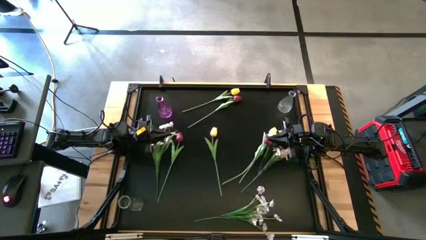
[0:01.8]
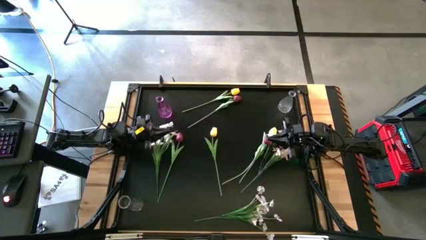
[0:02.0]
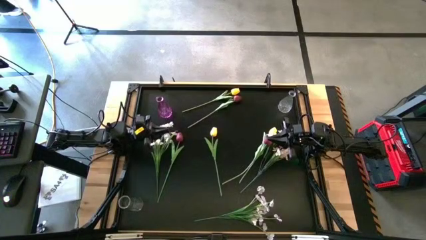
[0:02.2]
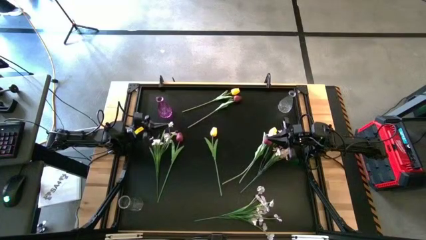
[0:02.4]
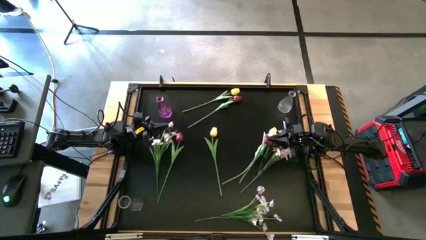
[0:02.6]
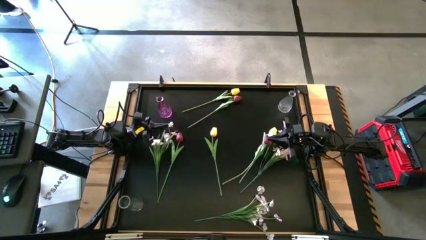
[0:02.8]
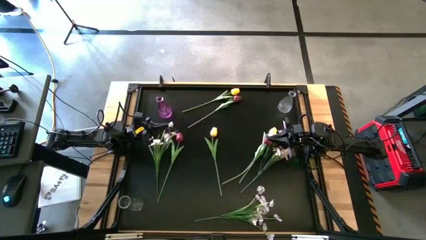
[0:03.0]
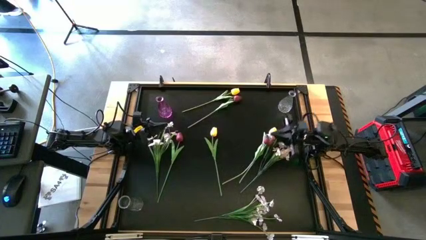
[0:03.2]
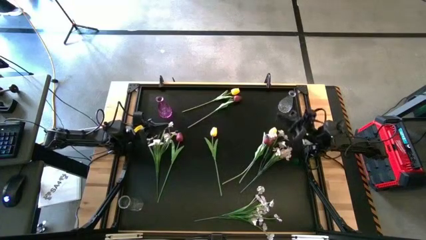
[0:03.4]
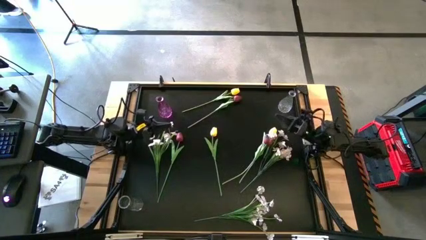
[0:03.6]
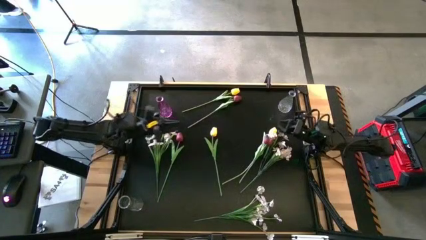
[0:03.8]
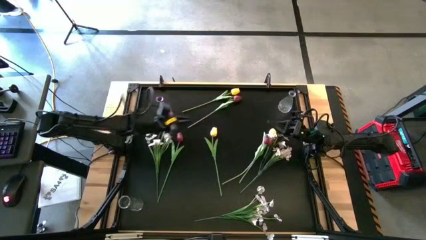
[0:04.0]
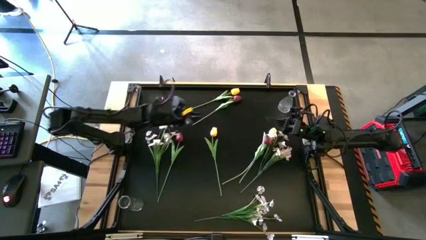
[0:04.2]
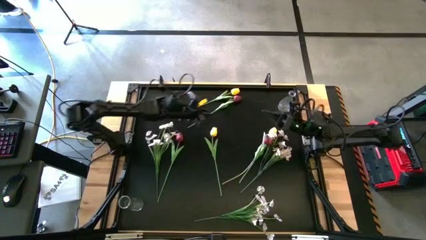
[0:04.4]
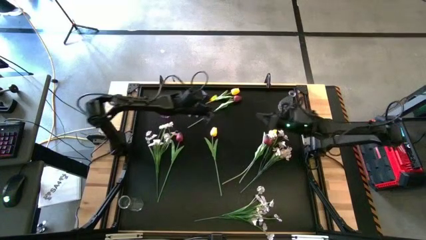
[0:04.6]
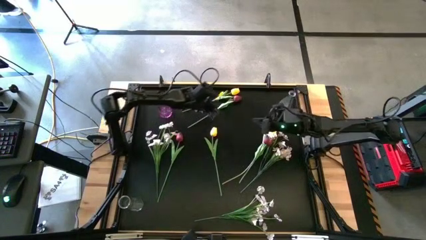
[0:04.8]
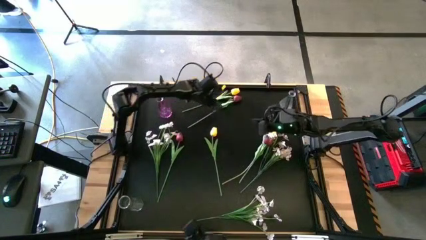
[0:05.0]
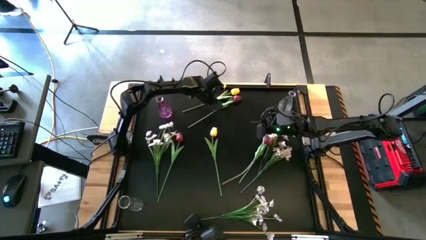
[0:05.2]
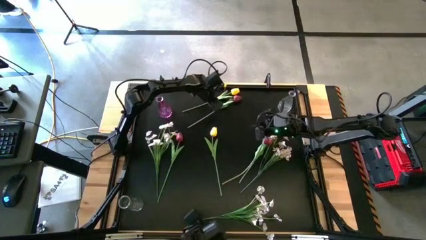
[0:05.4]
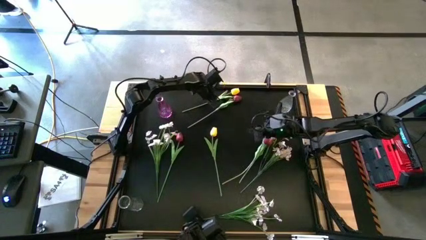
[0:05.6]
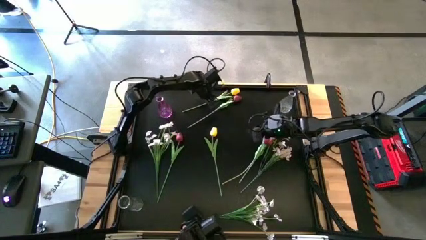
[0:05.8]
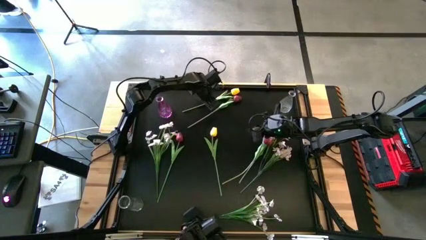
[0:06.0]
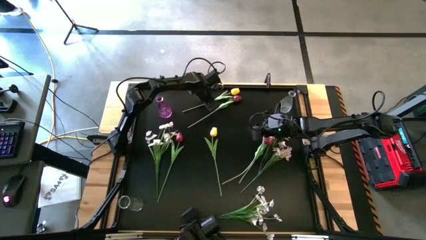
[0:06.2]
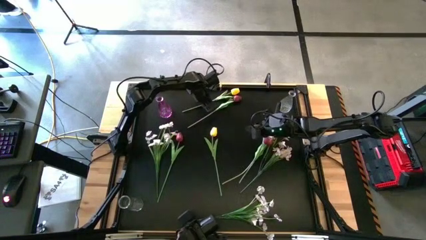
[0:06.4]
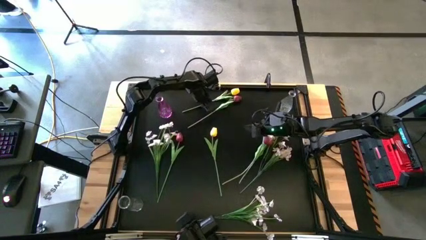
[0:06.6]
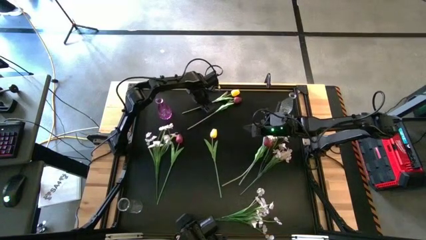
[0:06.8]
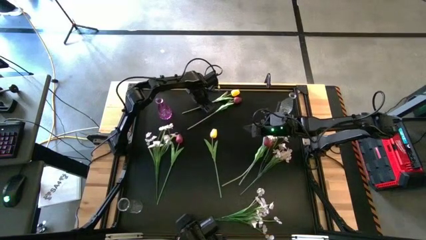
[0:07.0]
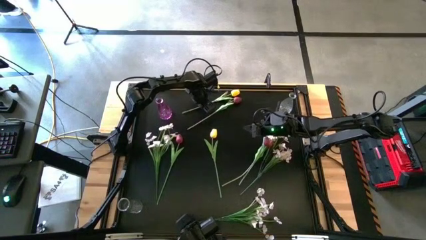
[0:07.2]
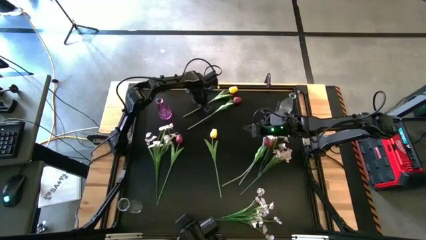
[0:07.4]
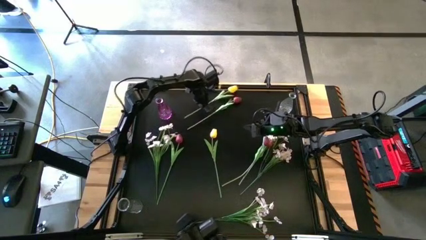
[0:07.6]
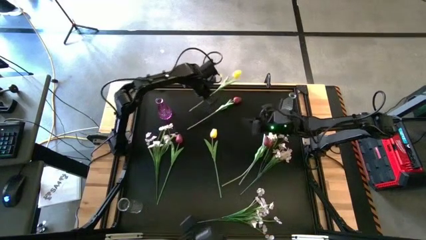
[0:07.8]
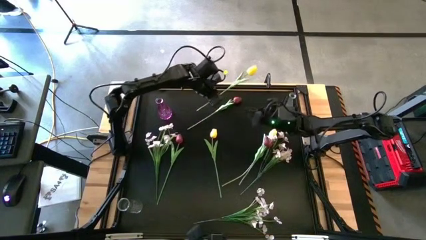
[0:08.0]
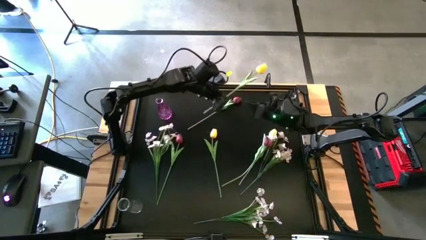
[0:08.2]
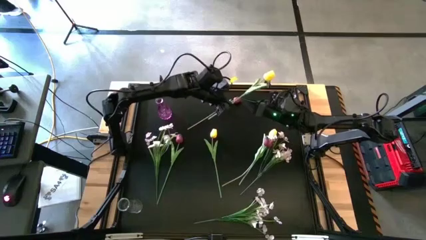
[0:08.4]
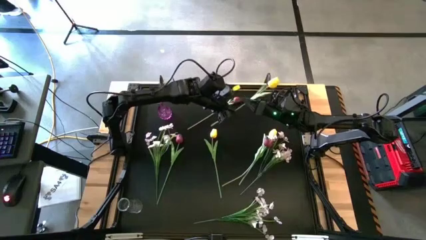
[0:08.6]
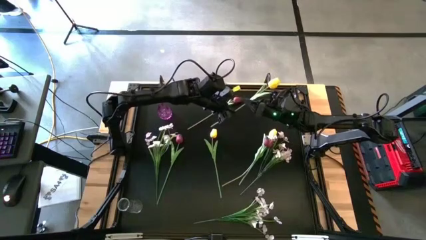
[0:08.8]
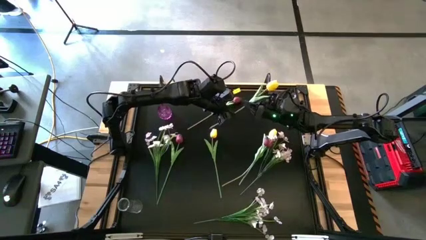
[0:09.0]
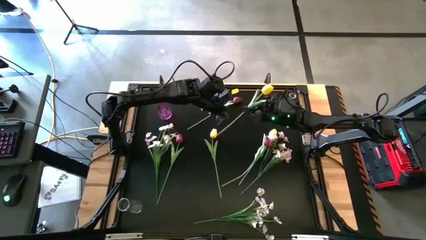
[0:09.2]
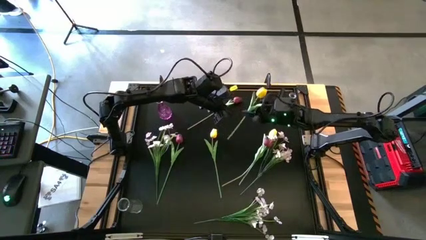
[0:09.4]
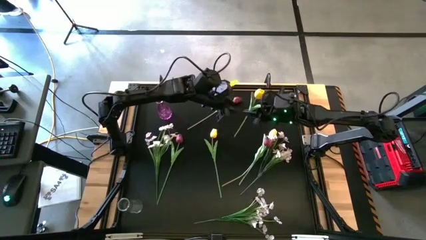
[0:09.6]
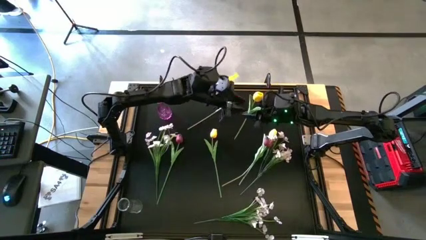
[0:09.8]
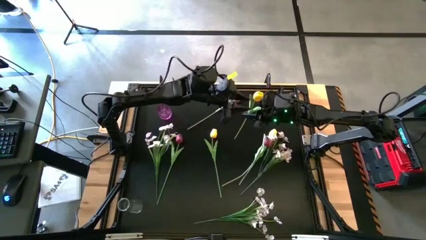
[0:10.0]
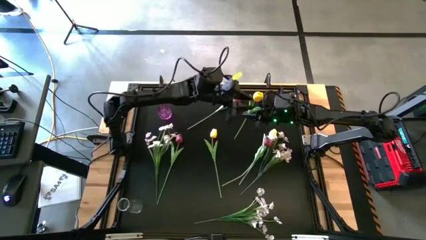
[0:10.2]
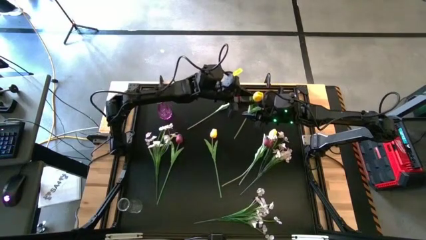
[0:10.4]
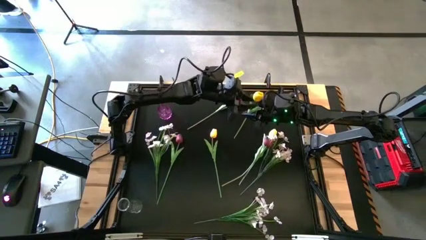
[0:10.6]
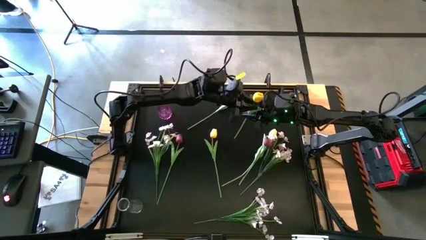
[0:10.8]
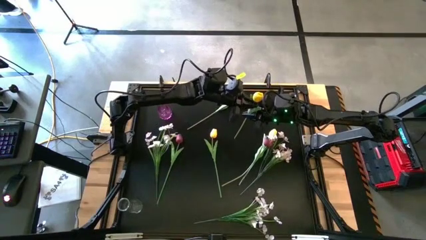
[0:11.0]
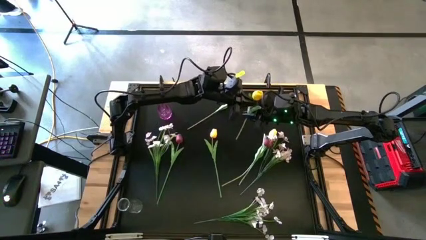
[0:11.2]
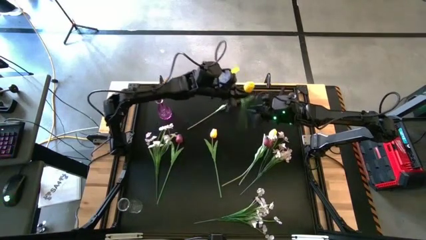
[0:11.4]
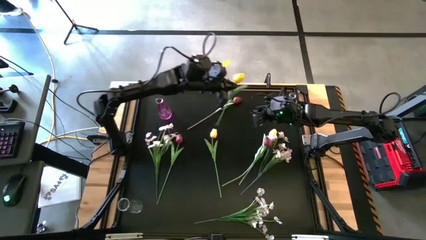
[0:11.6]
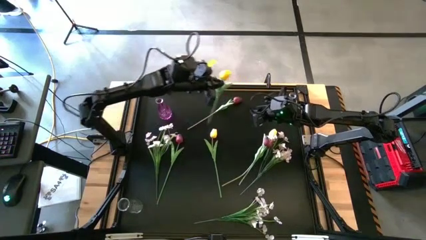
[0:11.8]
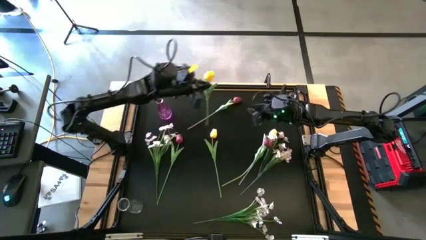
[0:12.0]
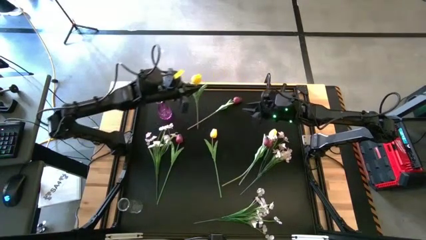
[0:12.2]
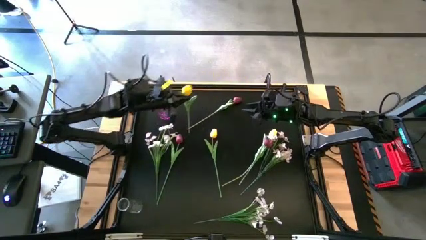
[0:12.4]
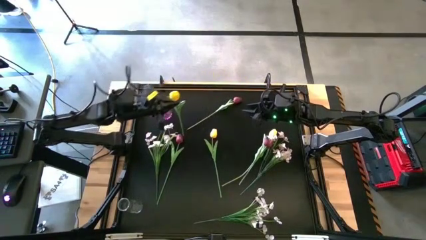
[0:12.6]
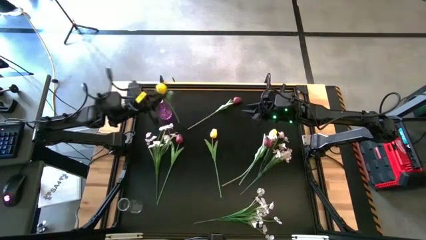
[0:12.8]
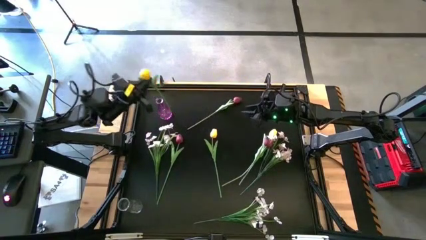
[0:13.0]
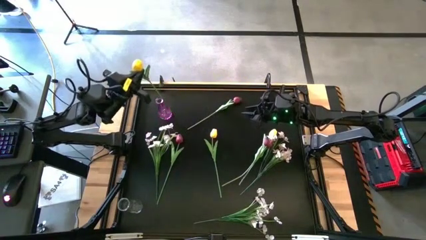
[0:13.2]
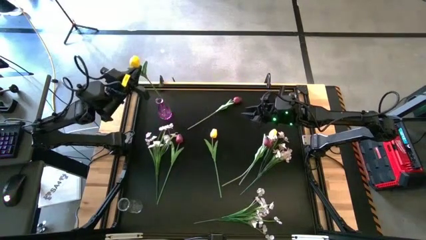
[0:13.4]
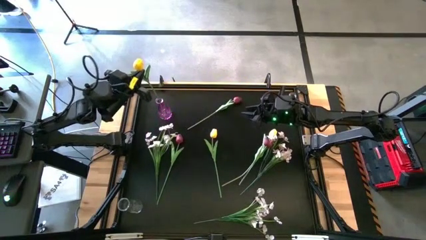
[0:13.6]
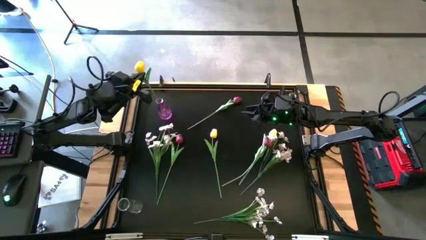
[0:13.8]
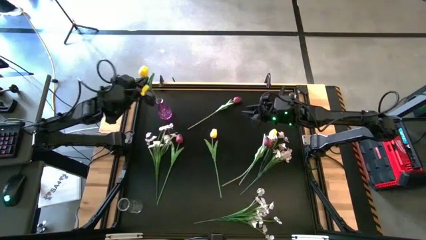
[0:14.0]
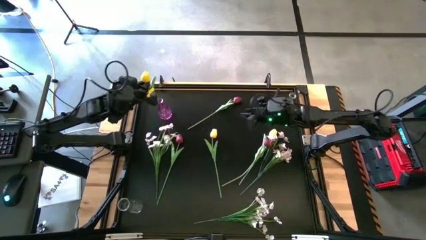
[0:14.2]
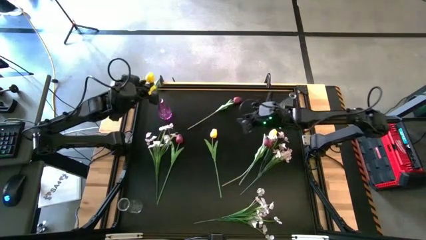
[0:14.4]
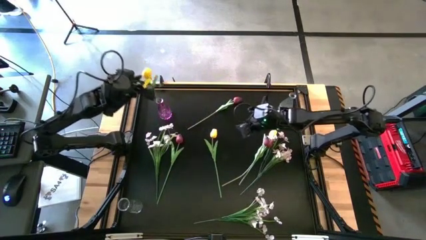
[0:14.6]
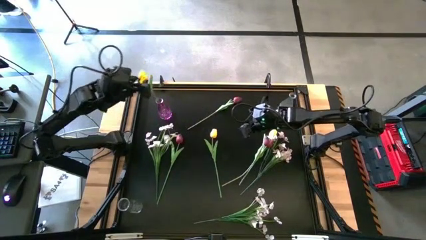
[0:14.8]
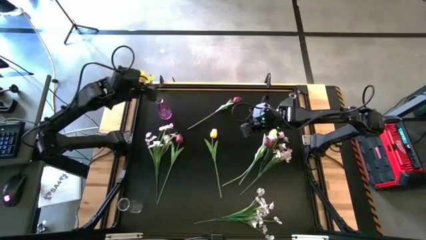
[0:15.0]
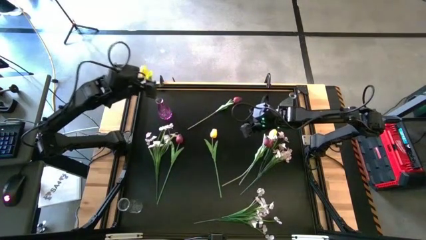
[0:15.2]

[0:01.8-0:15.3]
Task: Sort flowers into vase by color
Put the top yellow flower into the violet vase
